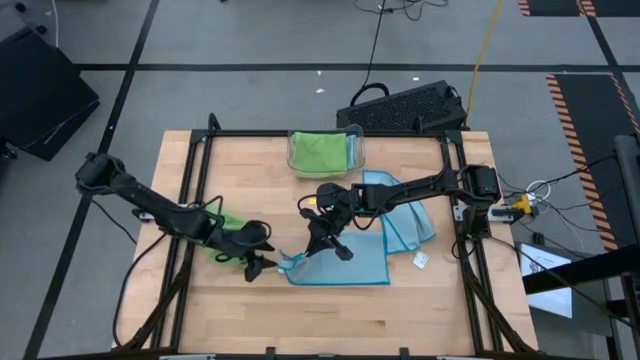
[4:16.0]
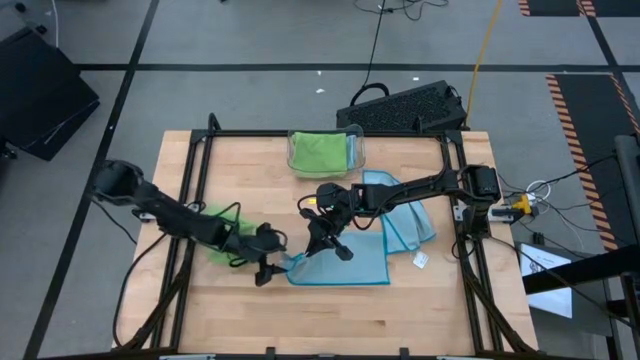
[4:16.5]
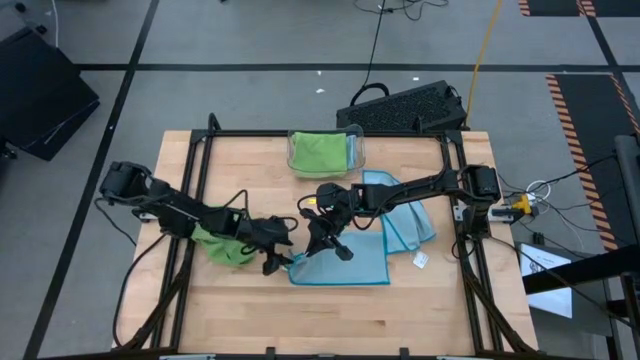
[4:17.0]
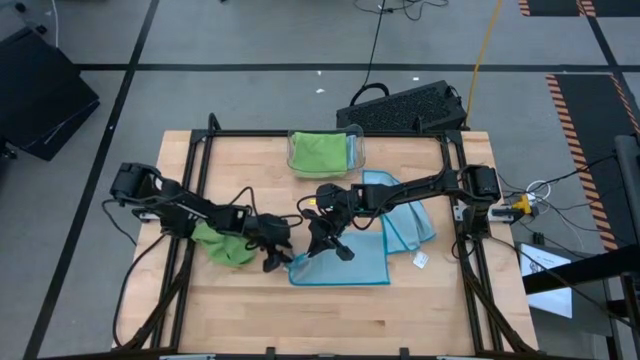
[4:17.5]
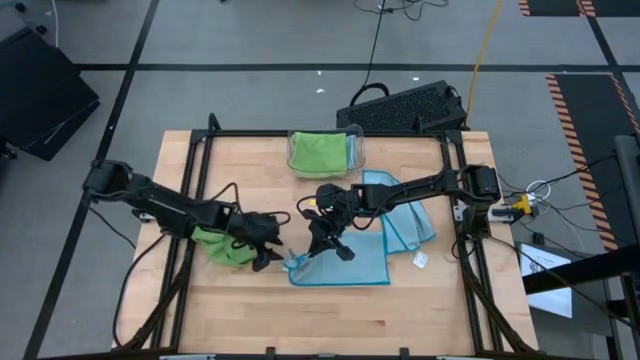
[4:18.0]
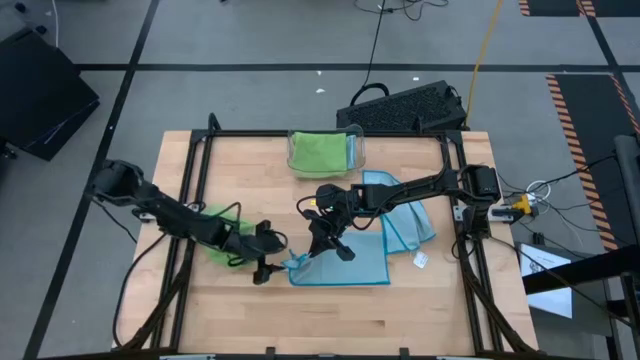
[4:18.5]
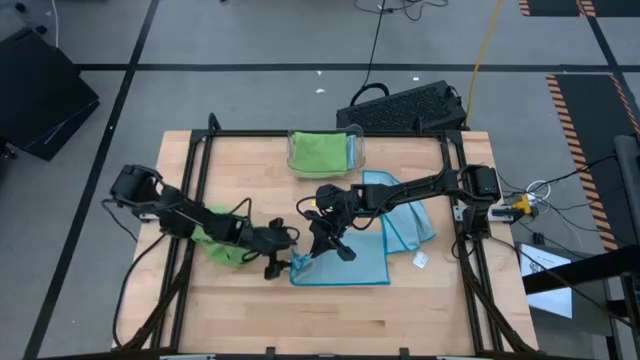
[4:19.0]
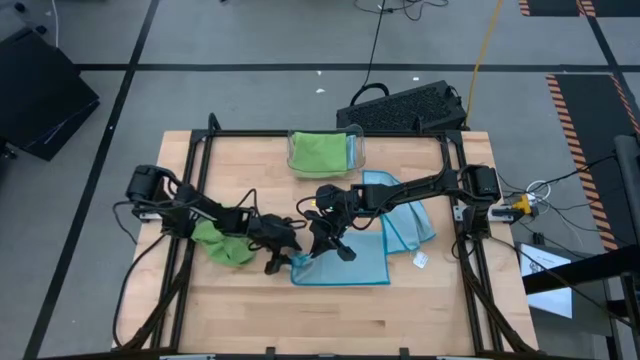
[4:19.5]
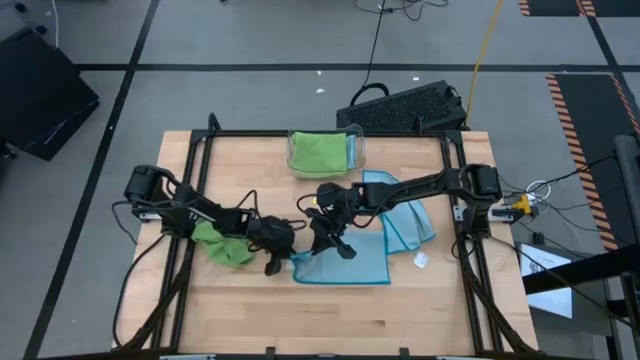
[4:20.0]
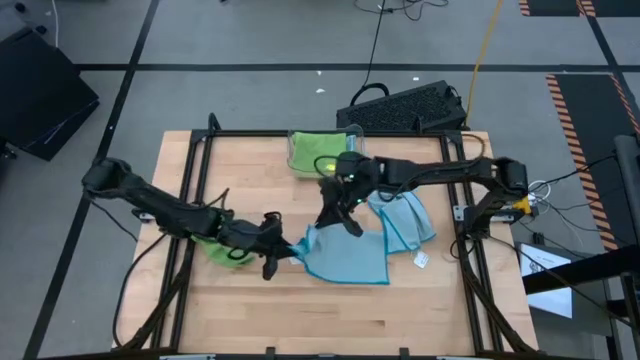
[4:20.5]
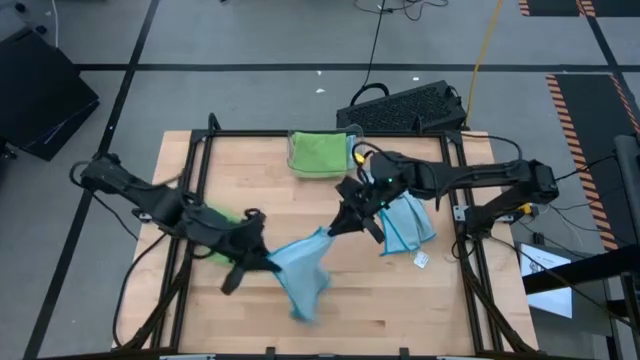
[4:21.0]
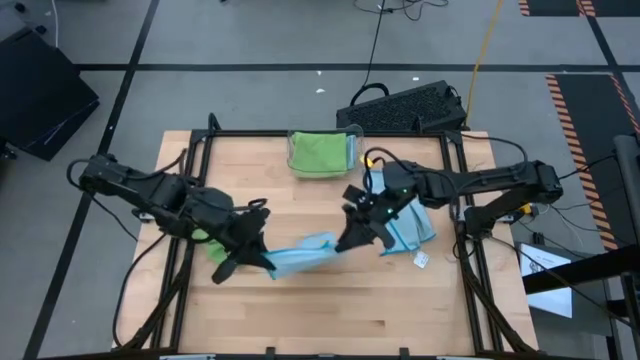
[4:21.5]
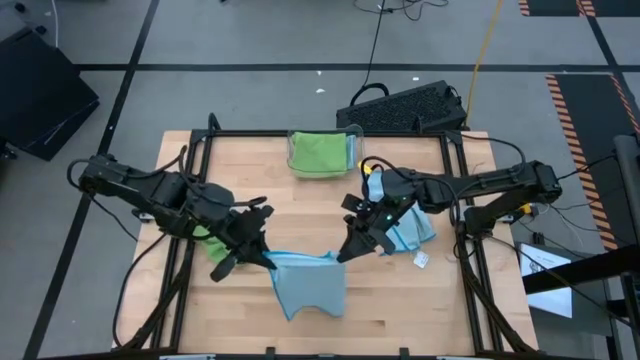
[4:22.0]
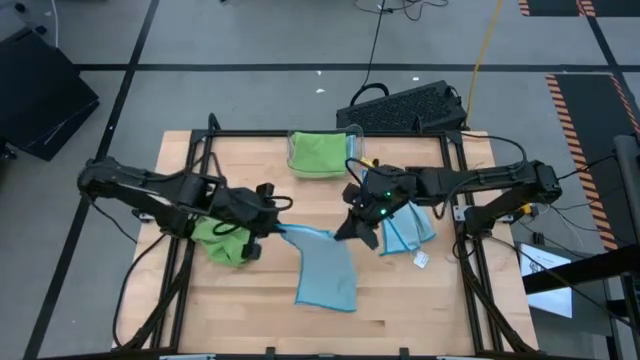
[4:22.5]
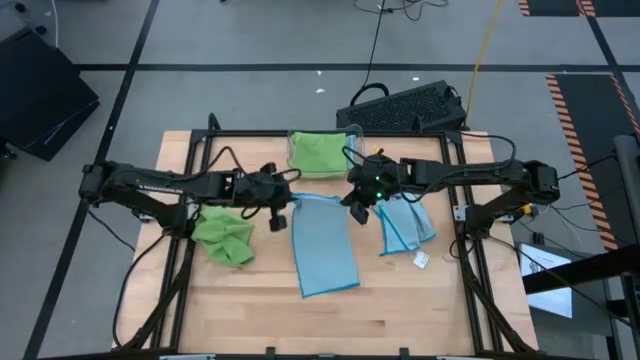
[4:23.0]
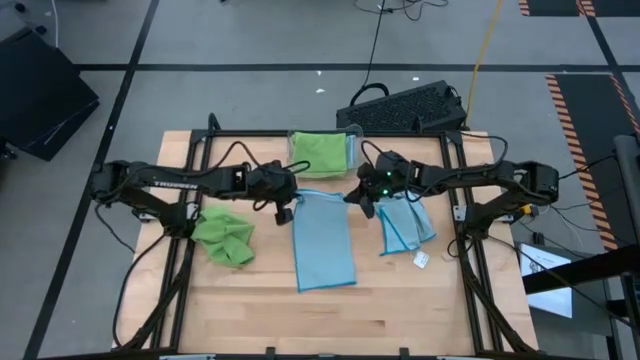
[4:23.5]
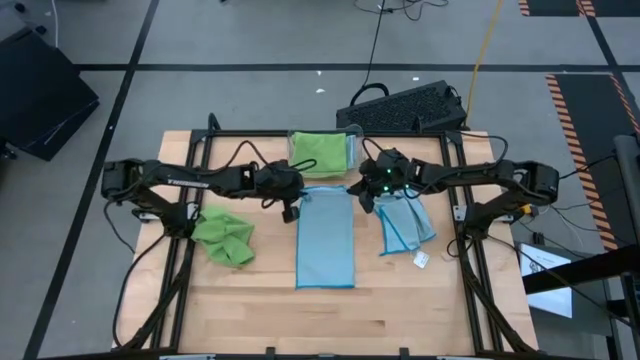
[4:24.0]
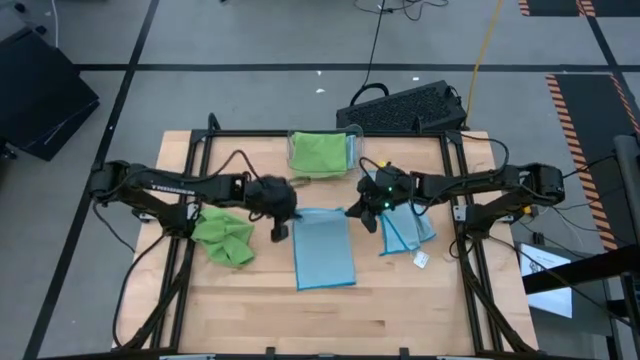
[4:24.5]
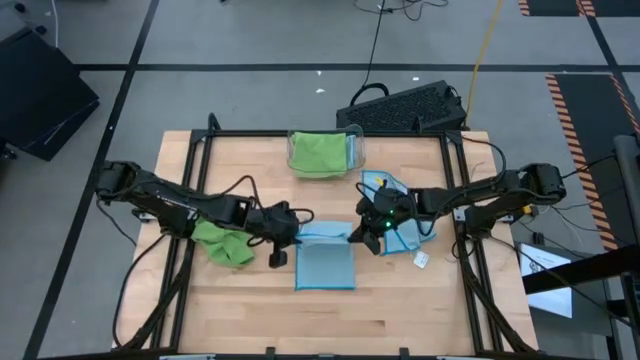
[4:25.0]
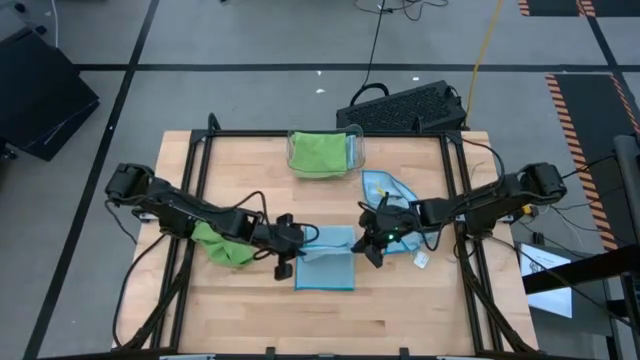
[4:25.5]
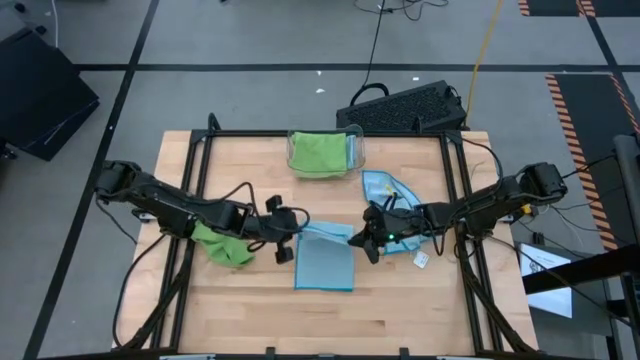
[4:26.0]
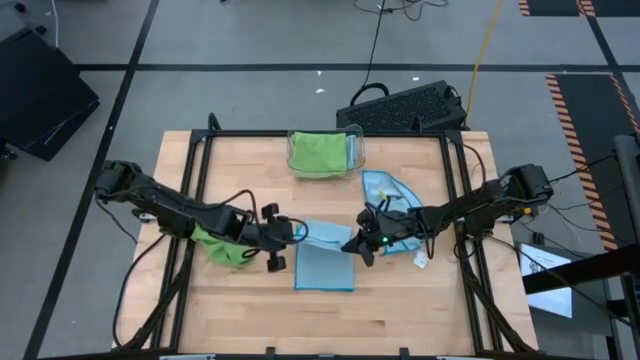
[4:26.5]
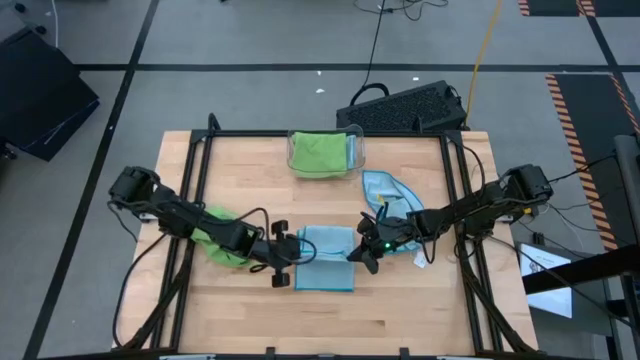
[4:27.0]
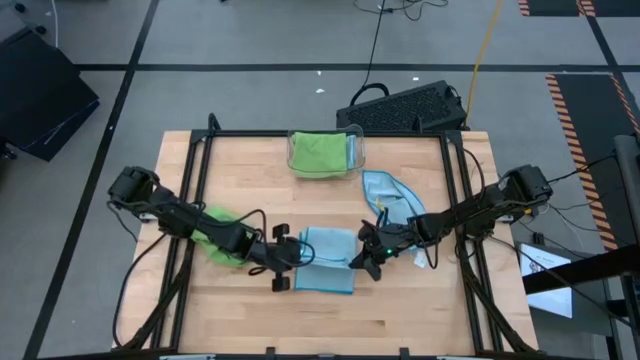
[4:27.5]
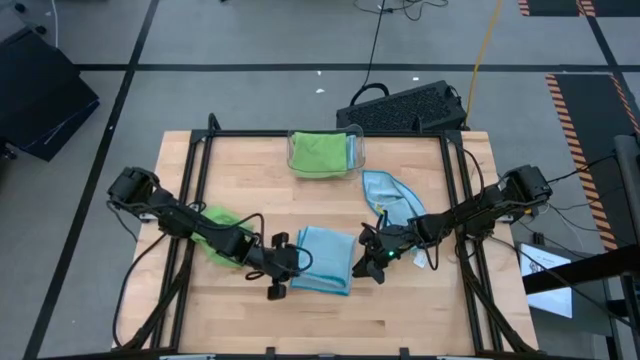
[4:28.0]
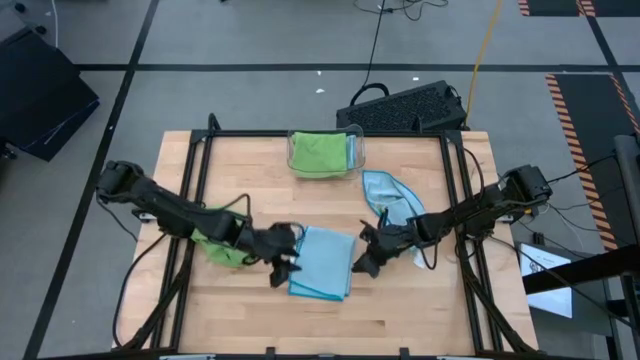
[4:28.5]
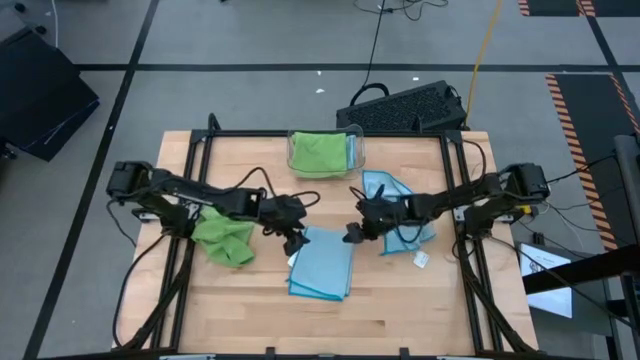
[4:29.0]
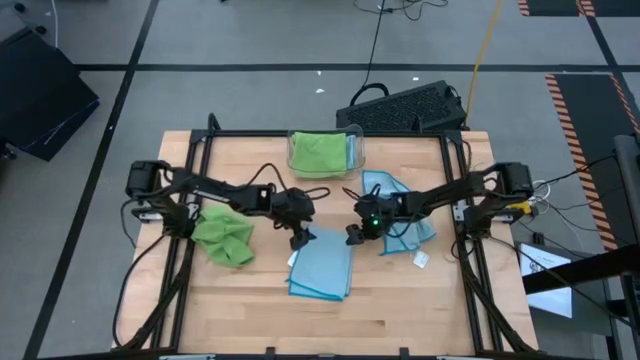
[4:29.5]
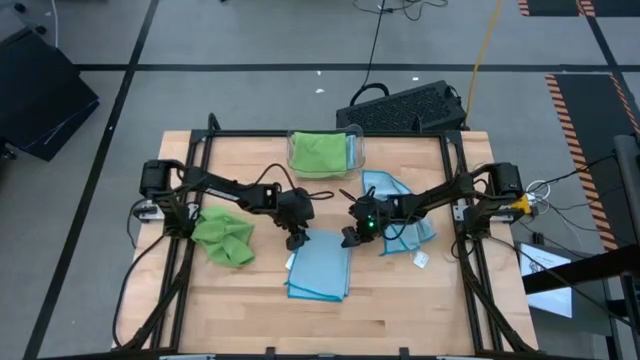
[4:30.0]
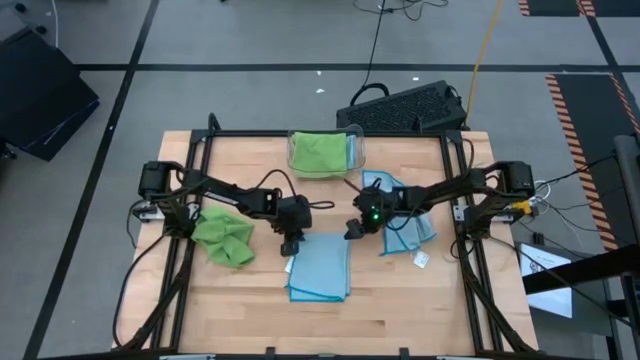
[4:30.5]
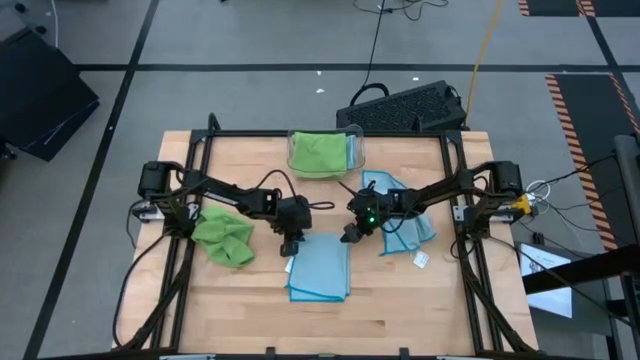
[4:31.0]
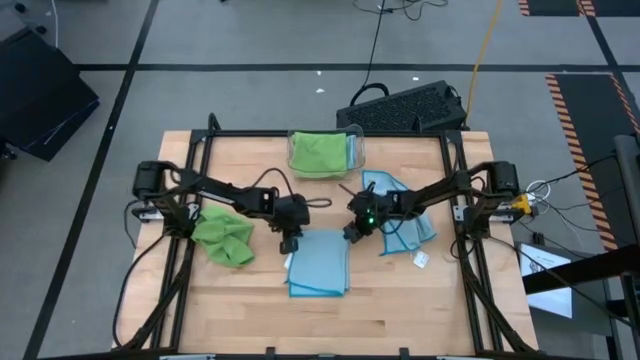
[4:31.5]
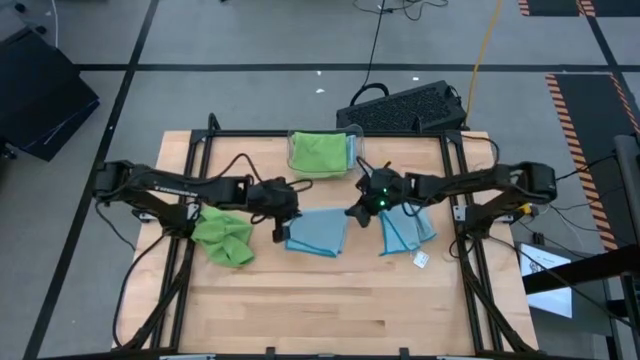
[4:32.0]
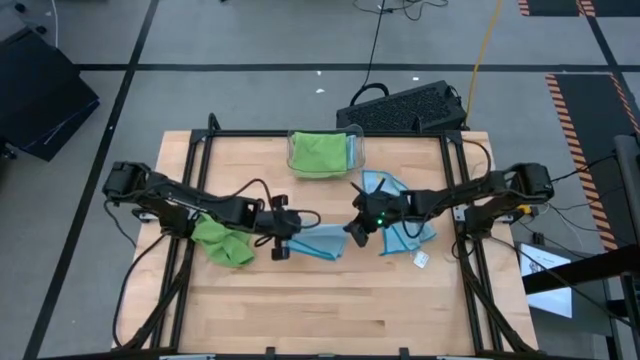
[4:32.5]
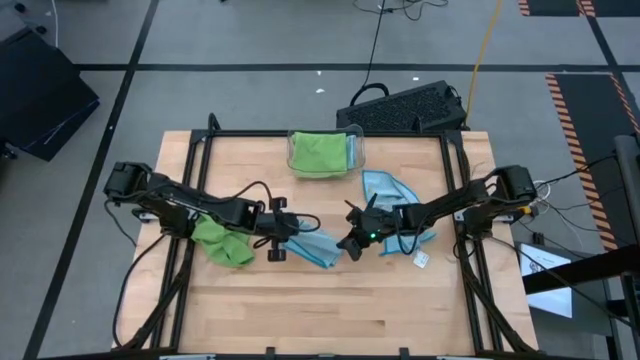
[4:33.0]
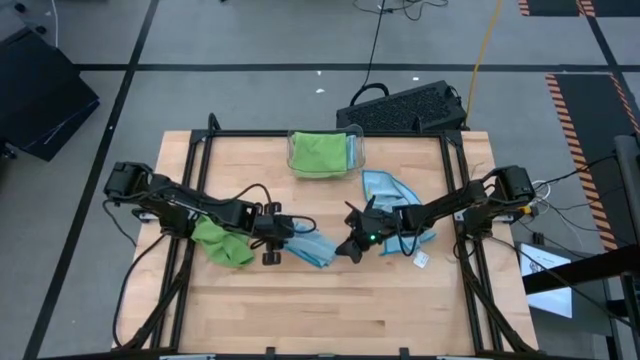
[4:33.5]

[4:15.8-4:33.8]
Task: Fold microfiber towels
Fold the left blue microfiber cloth

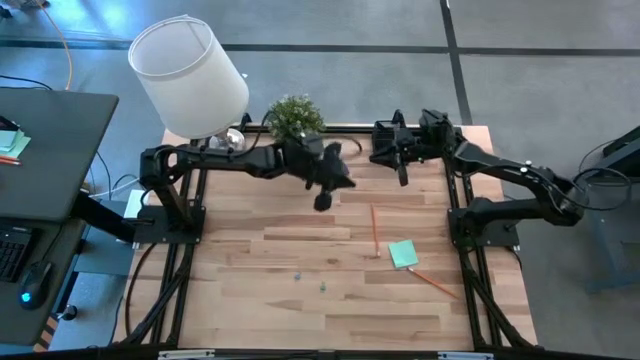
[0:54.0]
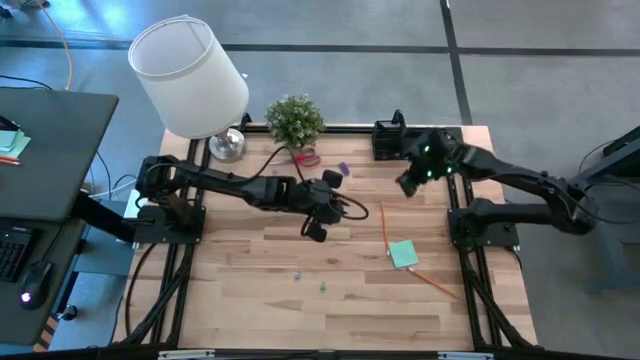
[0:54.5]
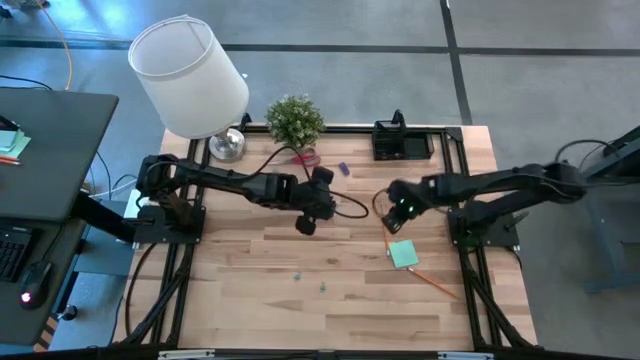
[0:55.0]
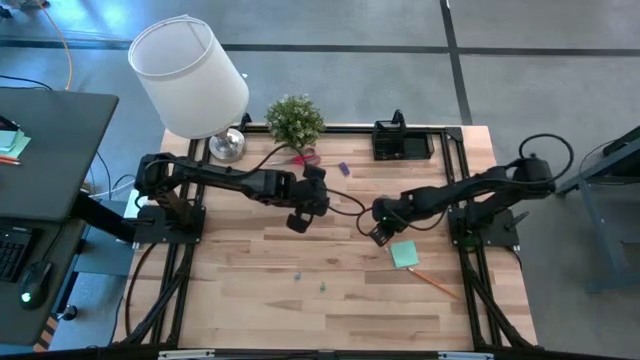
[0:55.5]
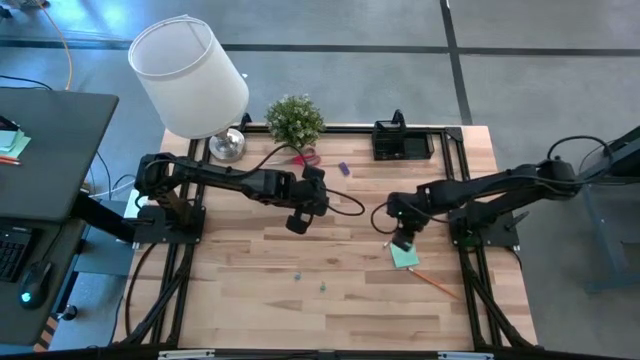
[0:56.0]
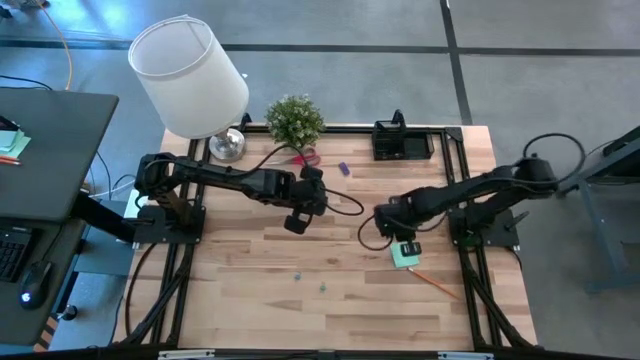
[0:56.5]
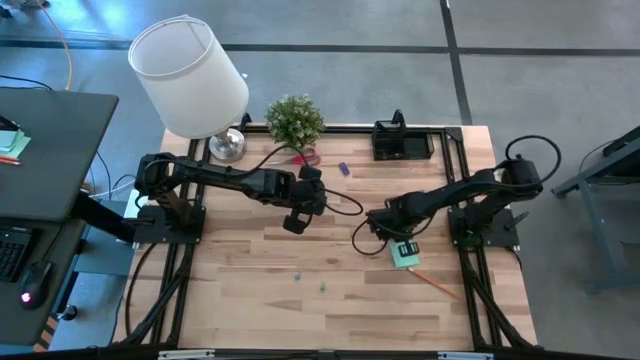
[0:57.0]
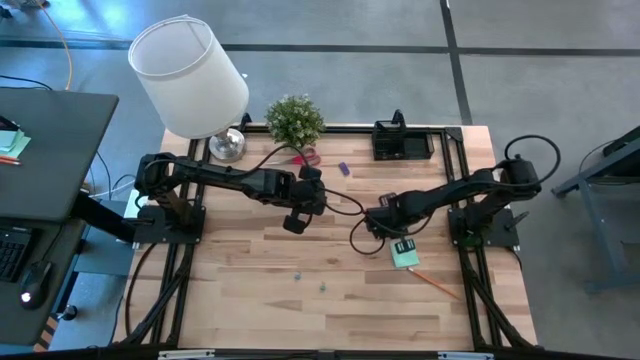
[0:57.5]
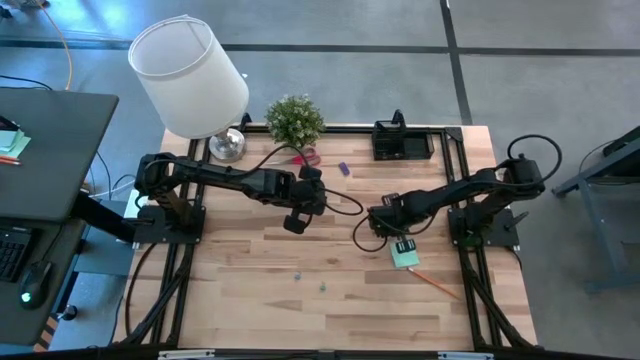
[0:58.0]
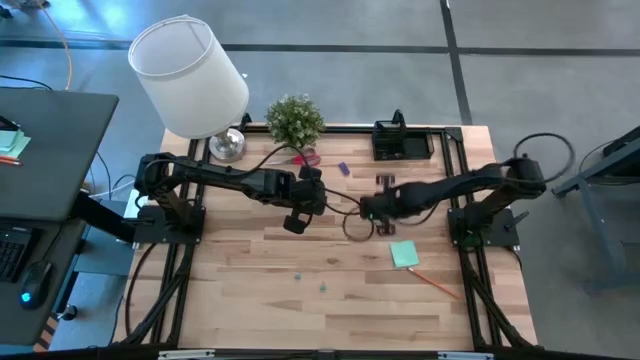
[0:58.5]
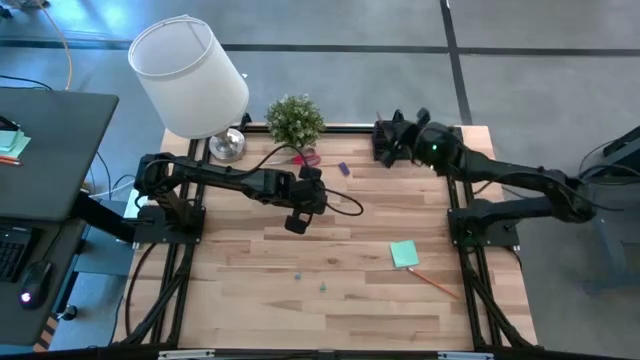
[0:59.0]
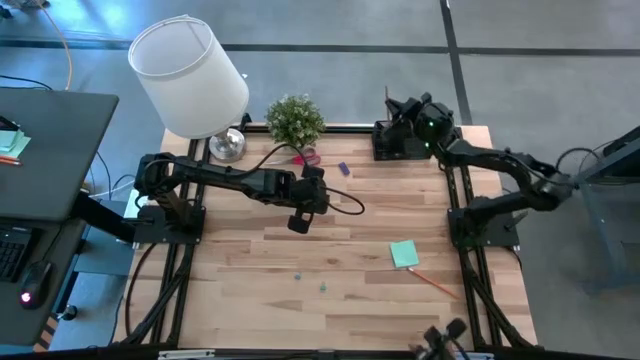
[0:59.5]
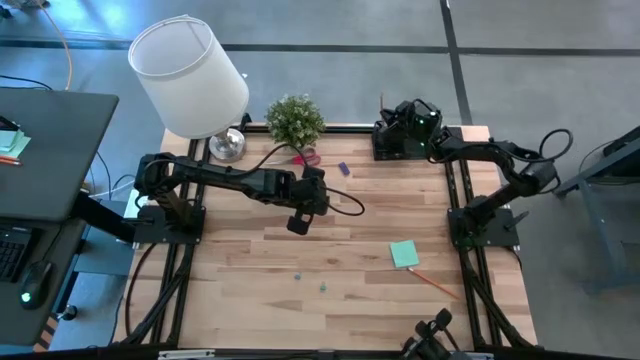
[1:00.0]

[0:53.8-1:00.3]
Task: Pick and place office supplies into organizer
Put the left orange pencil in the black desk organizer
